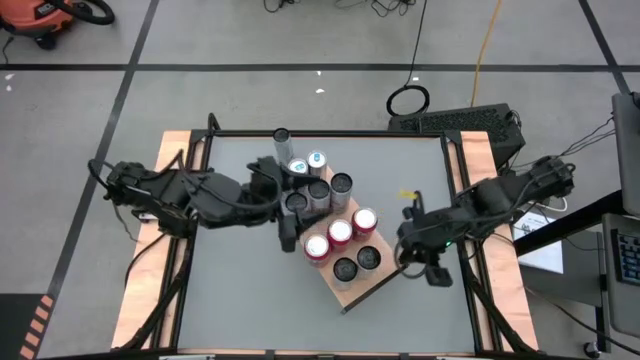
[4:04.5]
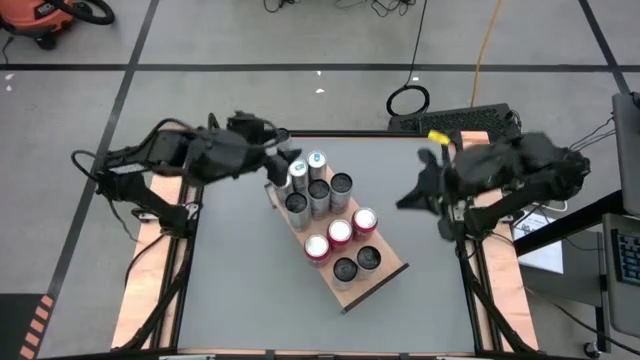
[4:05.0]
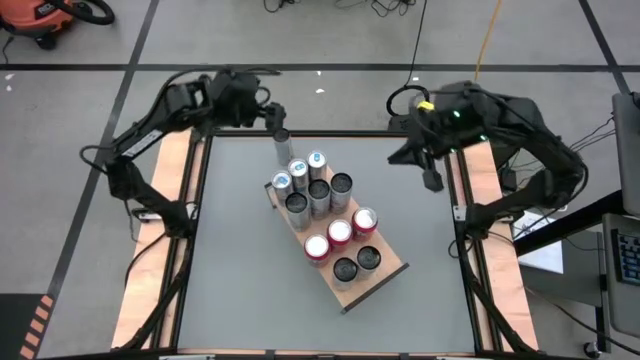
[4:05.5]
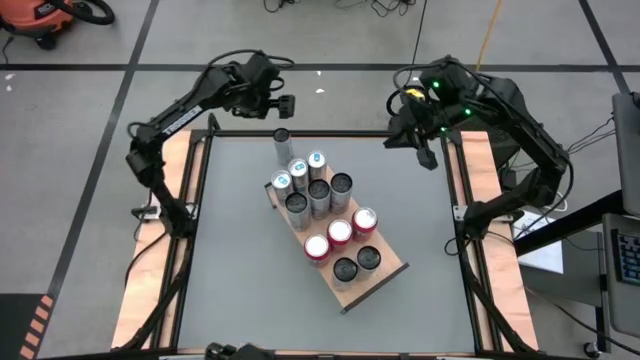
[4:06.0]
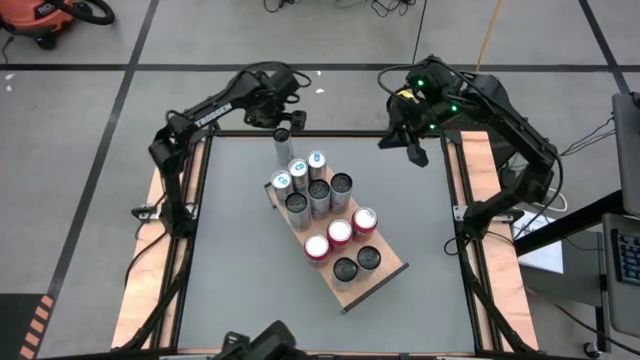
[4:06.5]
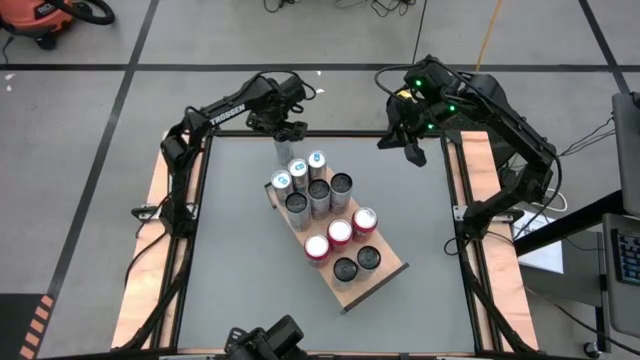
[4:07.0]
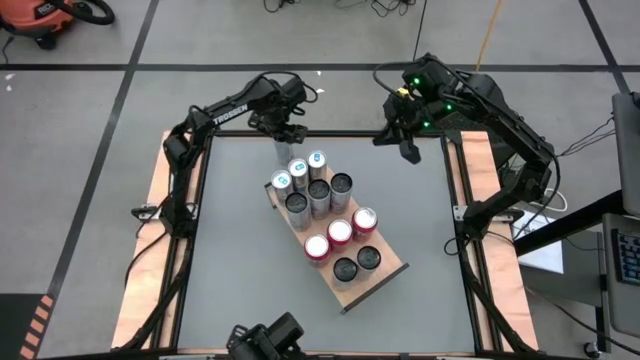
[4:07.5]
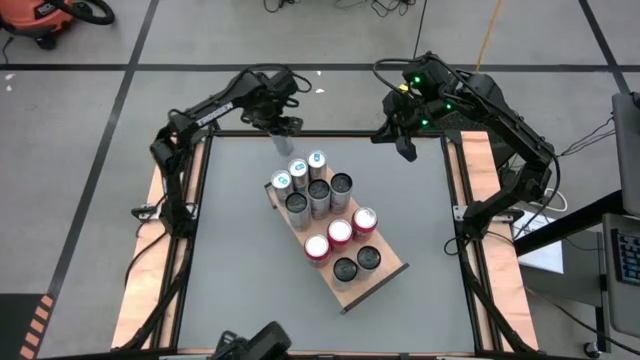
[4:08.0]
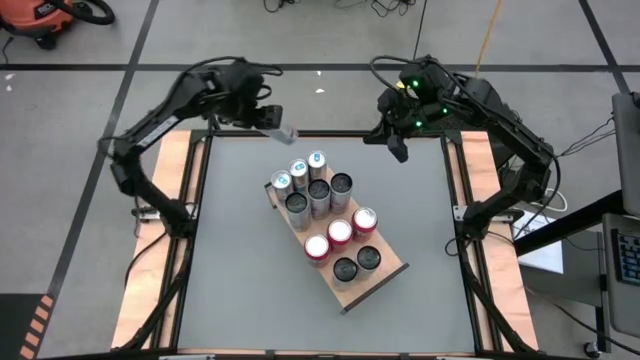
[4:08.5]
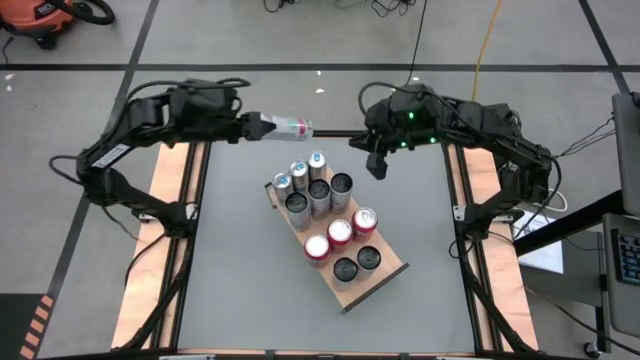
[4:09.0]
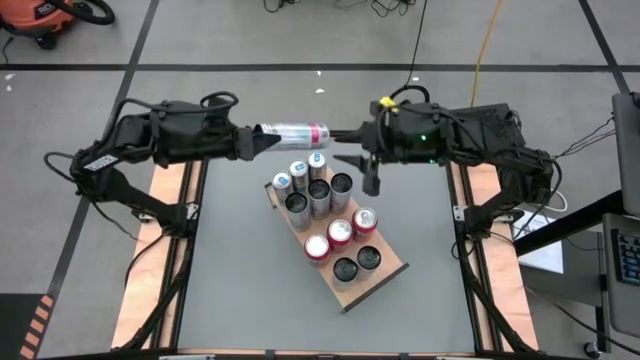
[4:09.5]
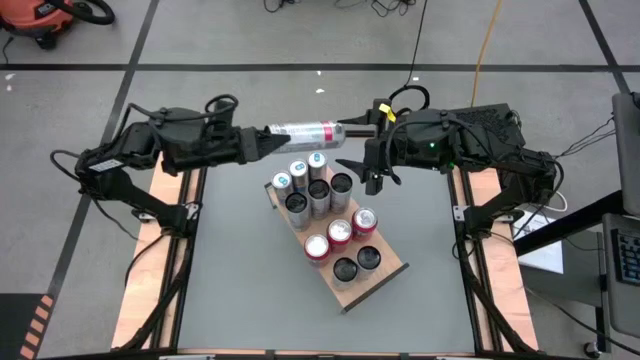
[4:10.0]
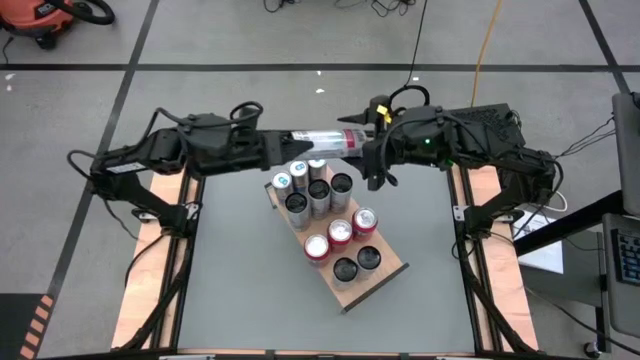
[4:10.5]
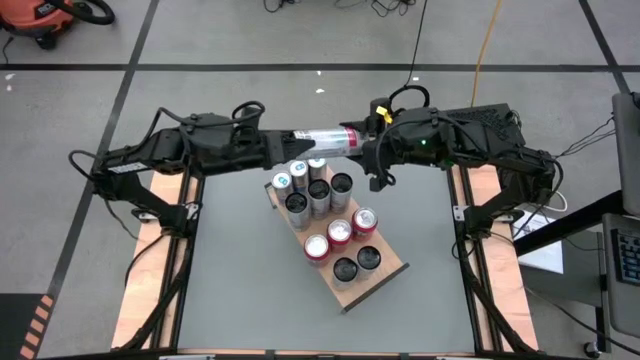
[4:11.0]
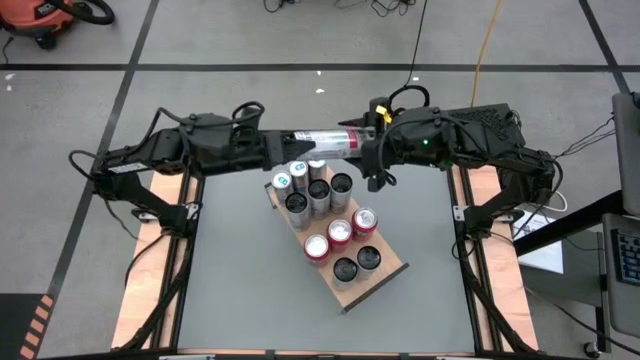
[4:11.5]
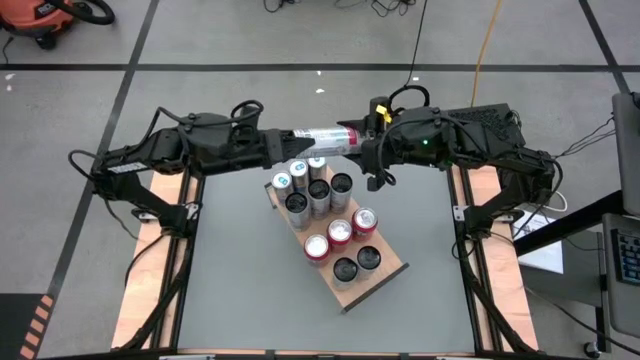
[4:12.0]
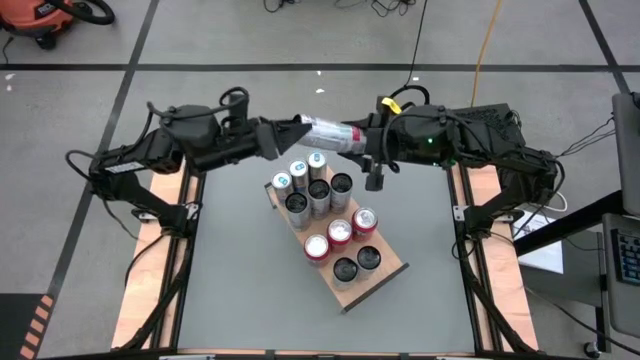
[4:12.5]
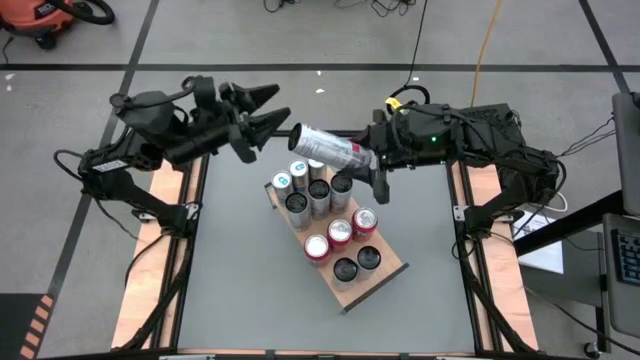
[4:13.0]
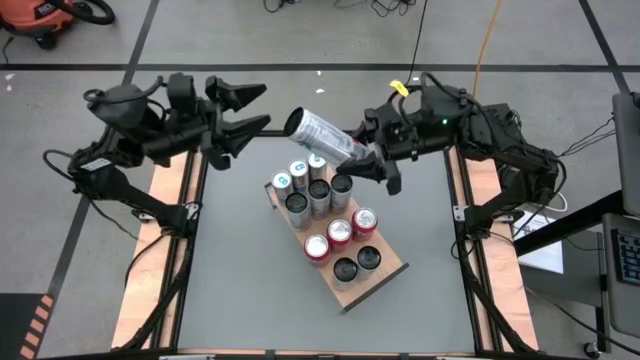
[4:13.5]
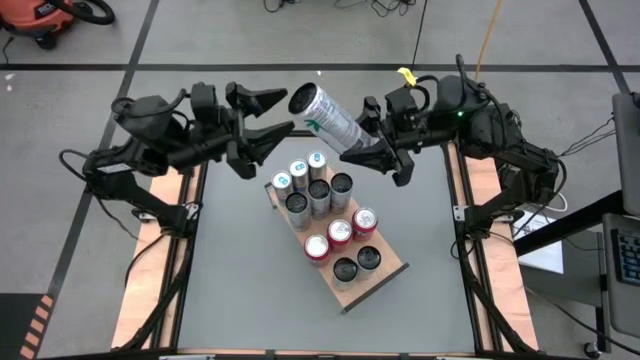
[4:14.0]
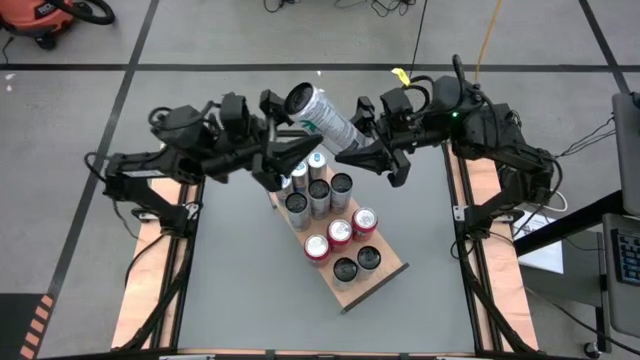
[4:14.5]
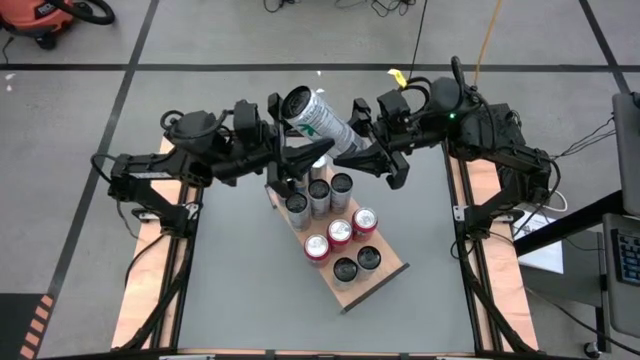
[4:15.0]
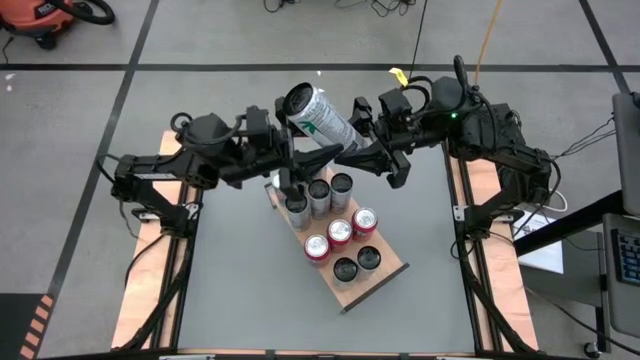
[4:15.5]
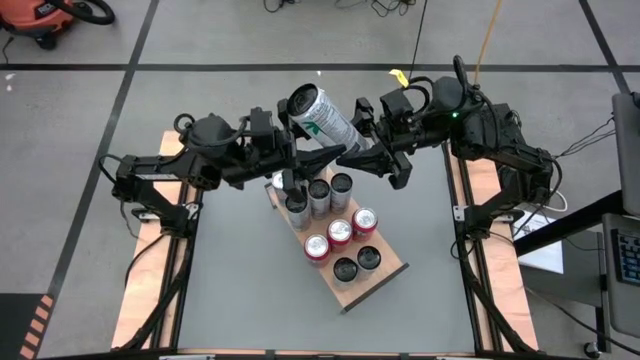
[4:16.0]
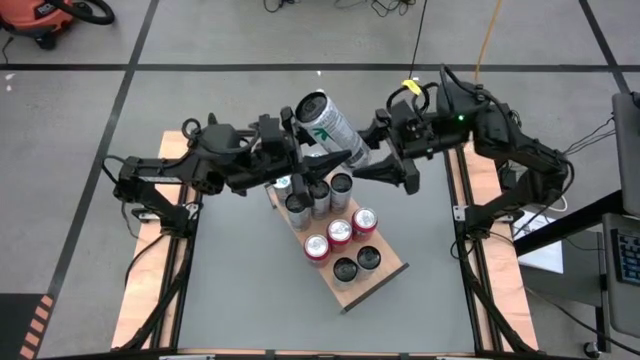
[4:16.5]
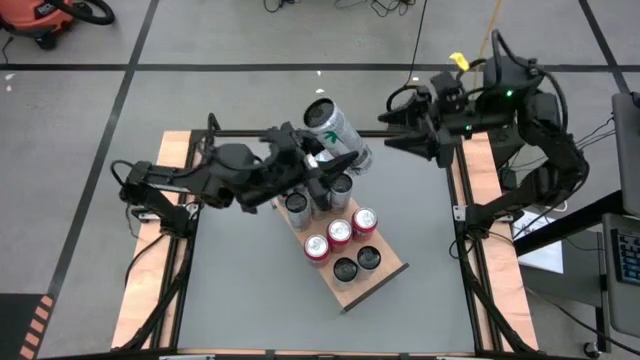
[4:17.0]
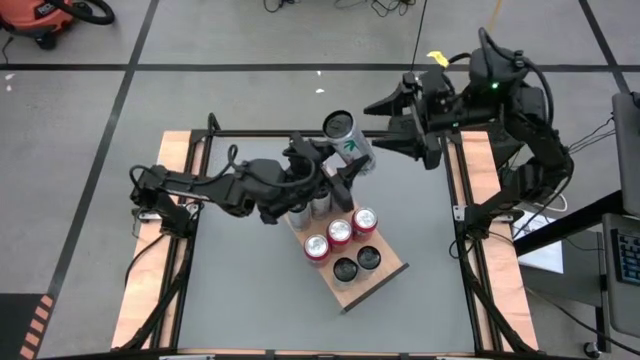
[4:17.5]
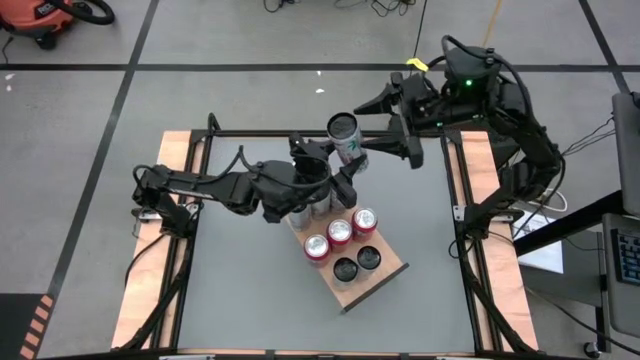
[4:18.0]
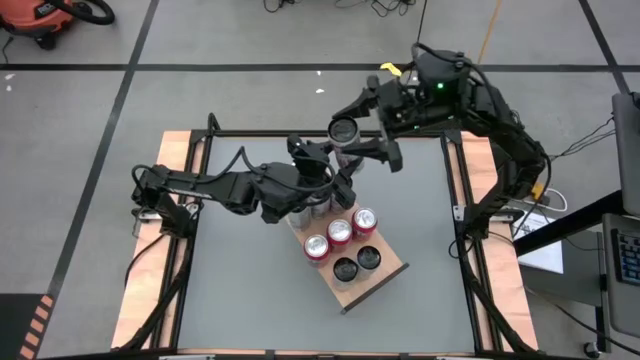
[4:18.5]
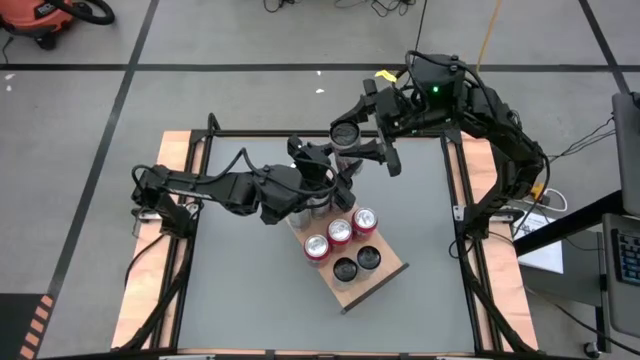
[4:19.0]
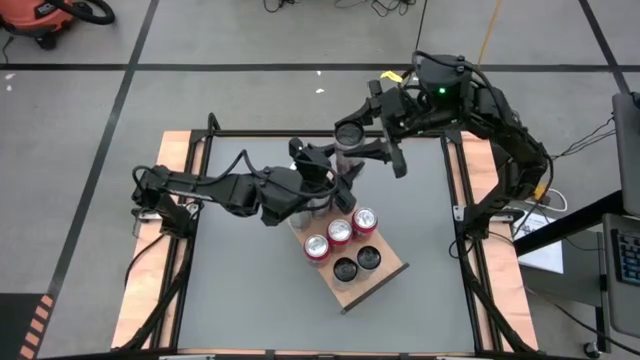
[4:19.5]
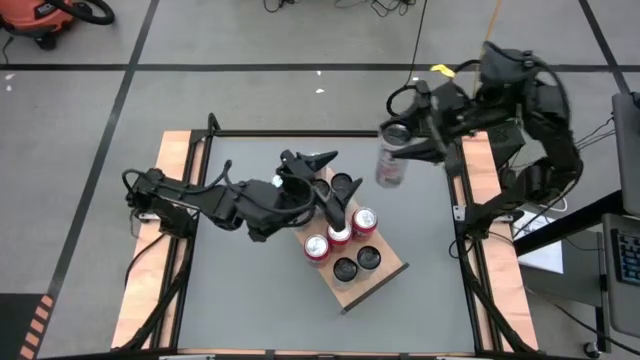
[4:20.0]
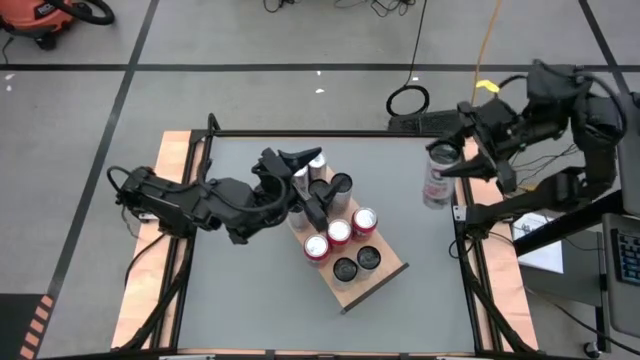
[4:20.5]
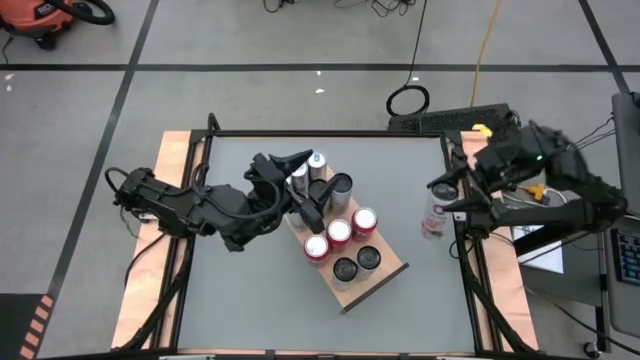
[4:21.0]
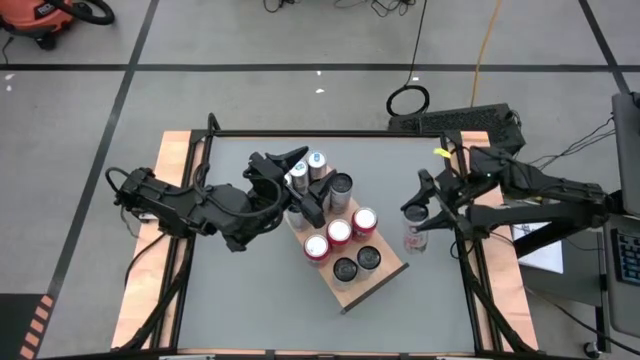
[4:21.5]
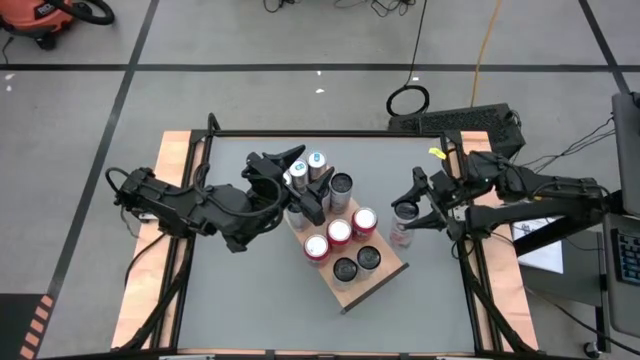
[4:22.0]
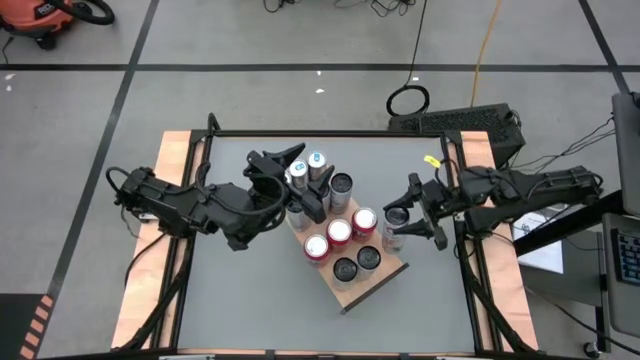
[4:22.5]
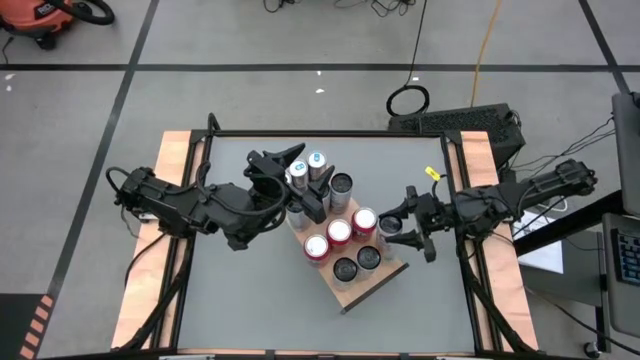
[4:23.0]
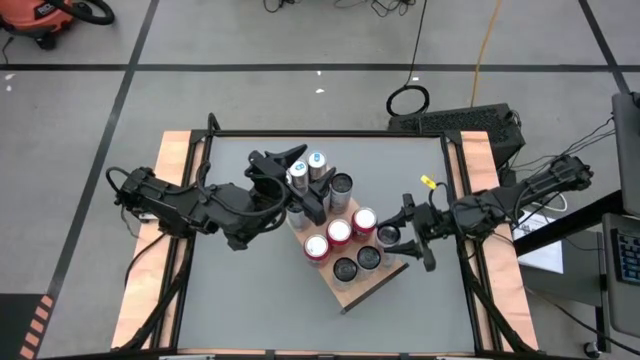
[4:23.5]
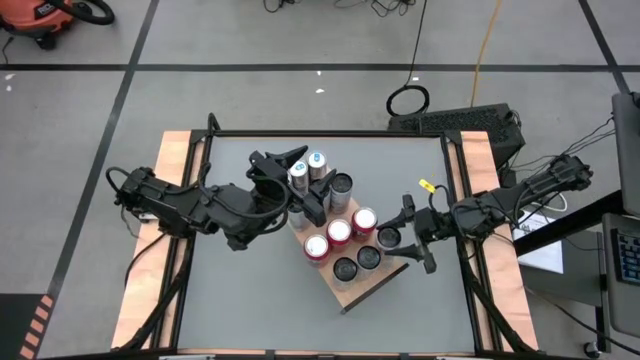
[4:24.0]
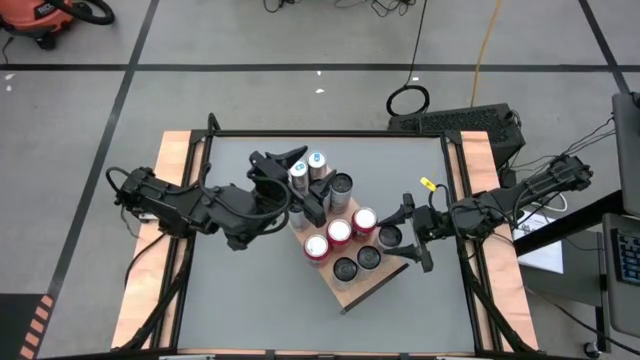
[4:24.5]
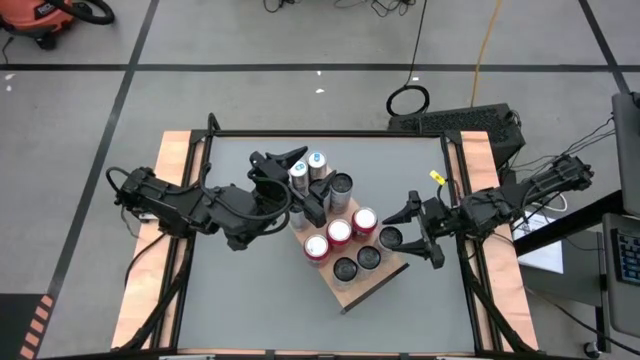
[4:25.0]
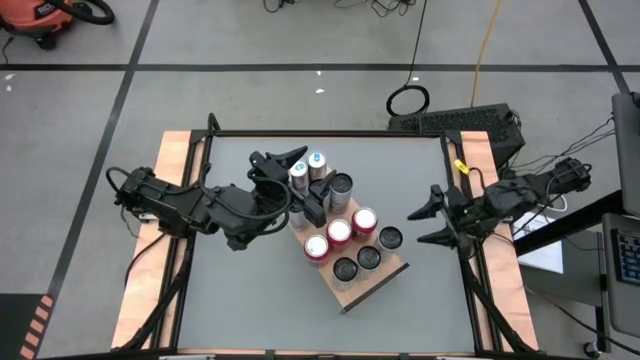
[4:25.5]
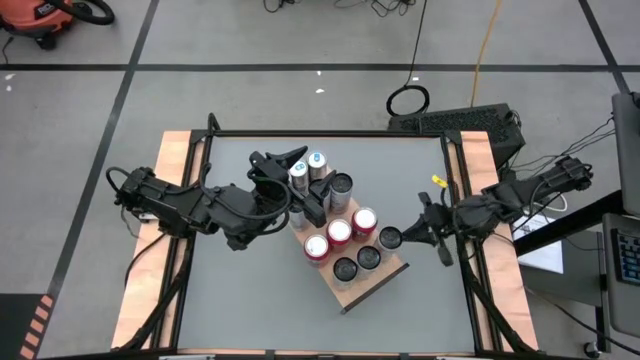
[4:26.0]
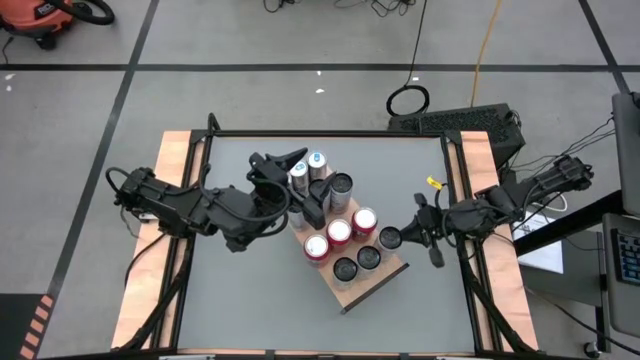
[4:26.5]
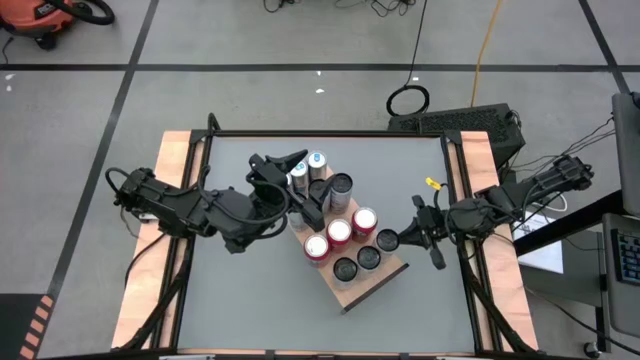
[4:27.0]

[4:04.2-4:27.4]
Task: Place canned beverage on shelf
Put the red soda can on the shelf aligned with the other red soda cans
